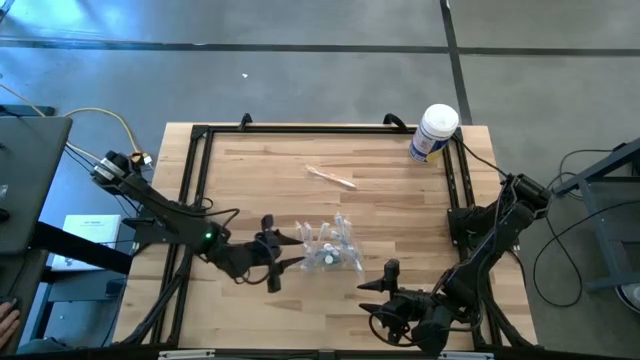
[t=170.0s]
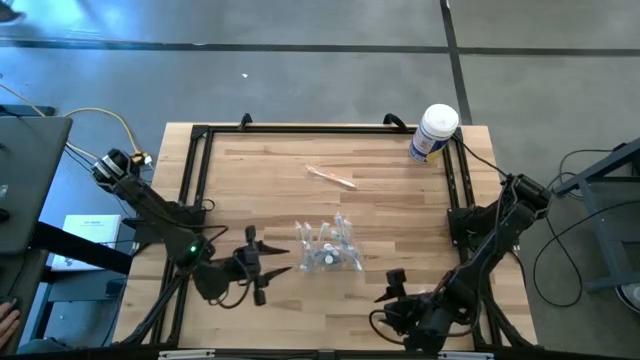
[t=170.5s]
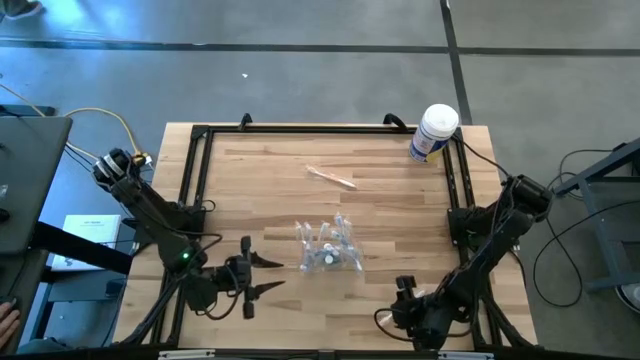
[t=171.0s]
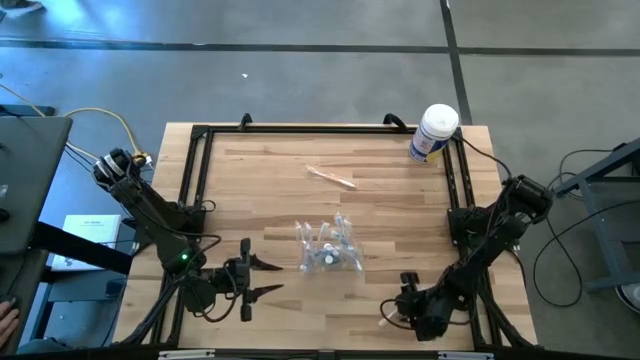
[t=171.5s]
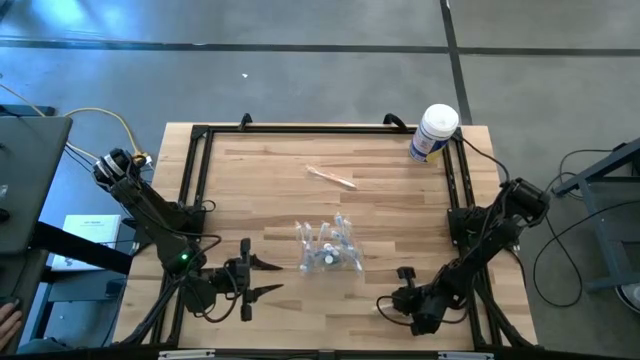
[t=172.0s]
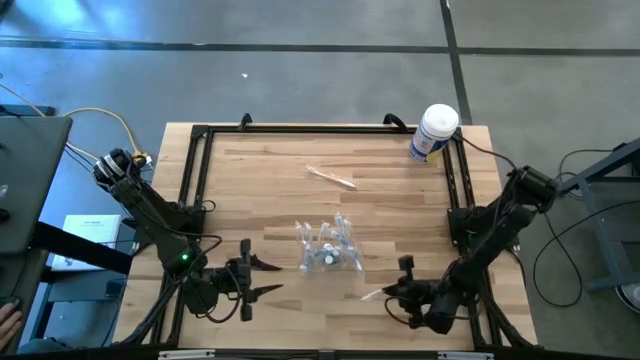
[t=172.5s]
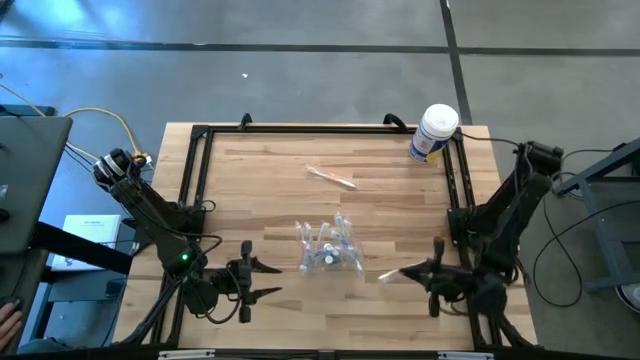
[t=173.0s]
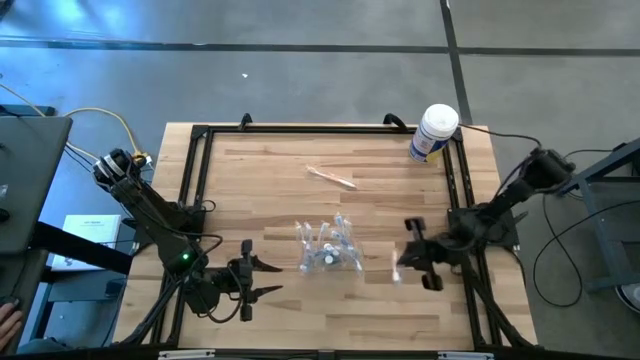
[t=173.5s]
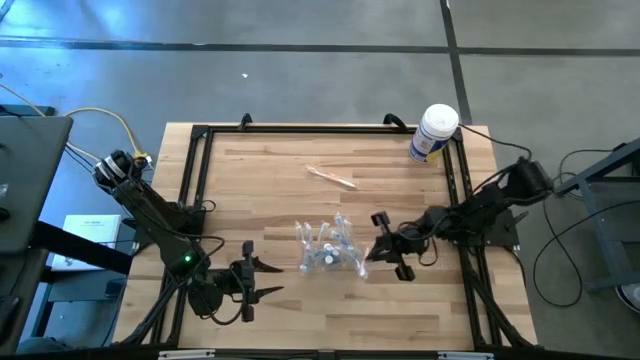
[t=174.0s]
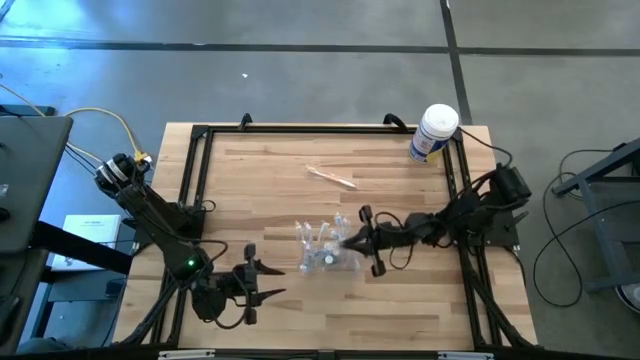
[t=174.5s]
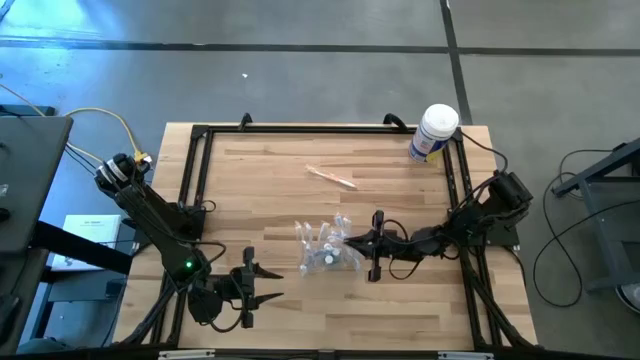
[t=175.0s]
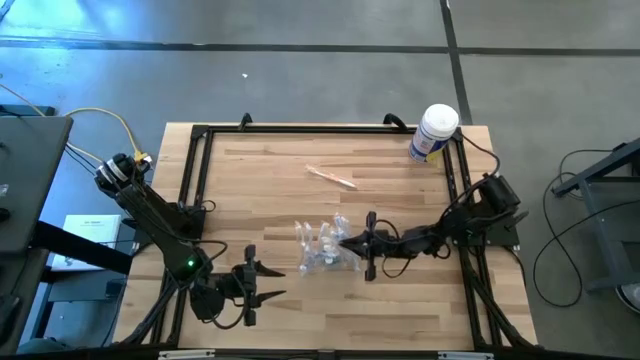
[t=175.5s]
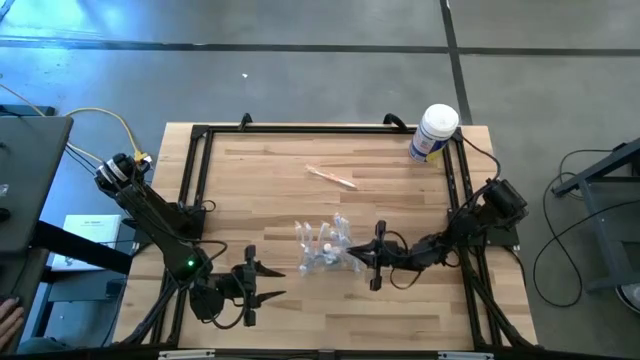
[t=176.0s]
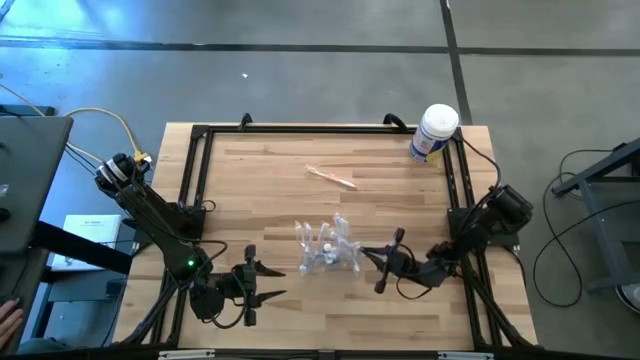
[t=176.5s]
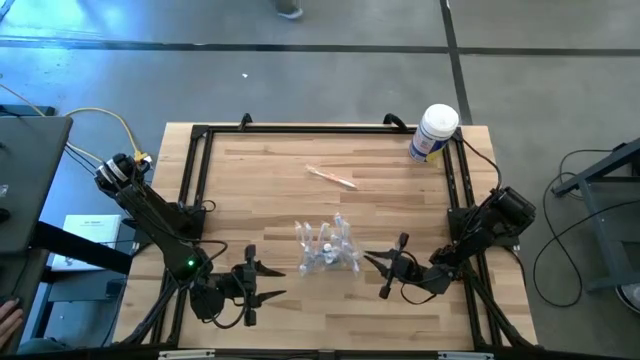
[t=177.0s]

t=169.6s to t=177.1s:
Task: Pick & Place toothbrushing station
Put the orange toothbrush into the transparent organizer

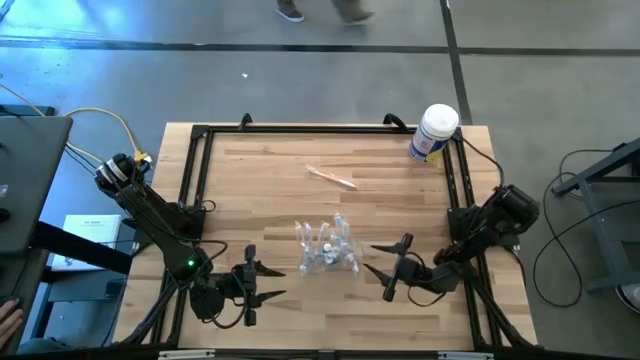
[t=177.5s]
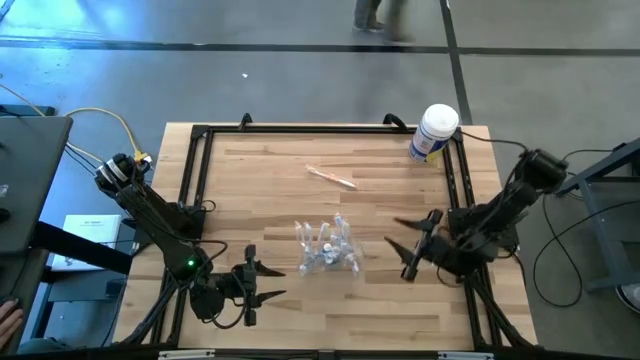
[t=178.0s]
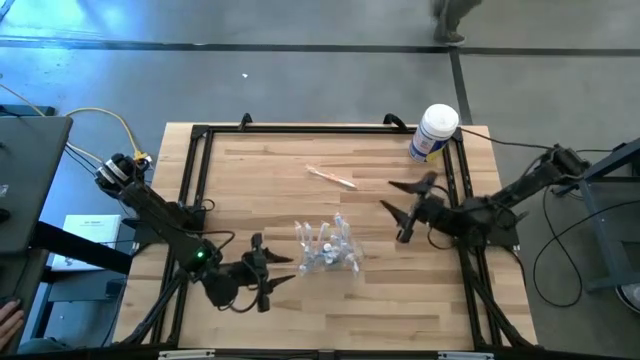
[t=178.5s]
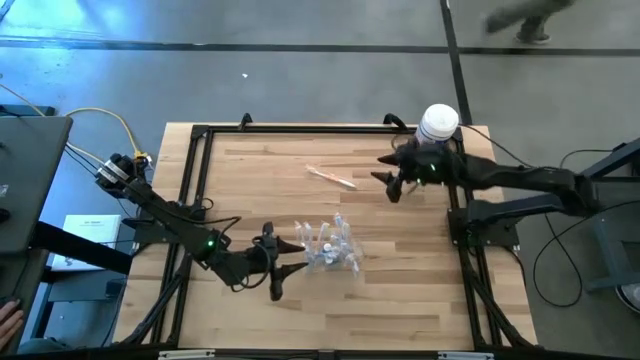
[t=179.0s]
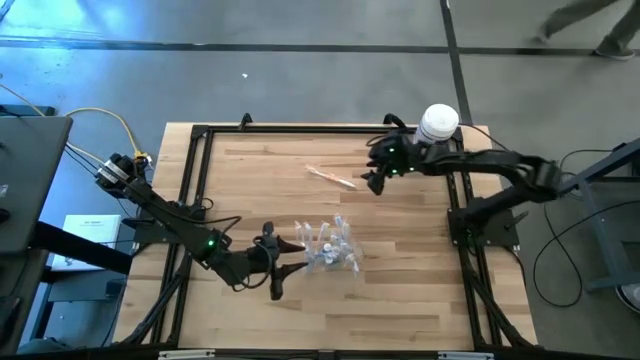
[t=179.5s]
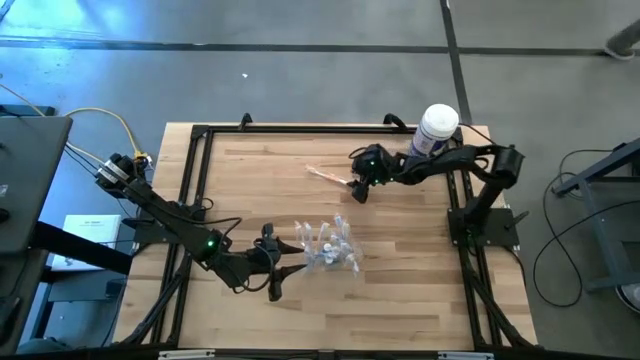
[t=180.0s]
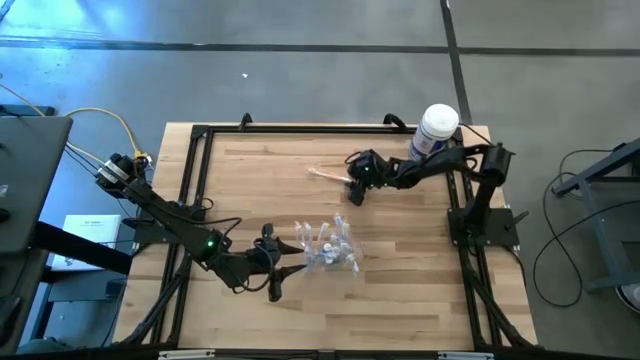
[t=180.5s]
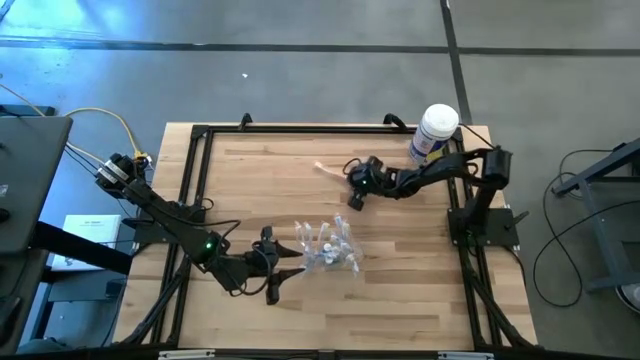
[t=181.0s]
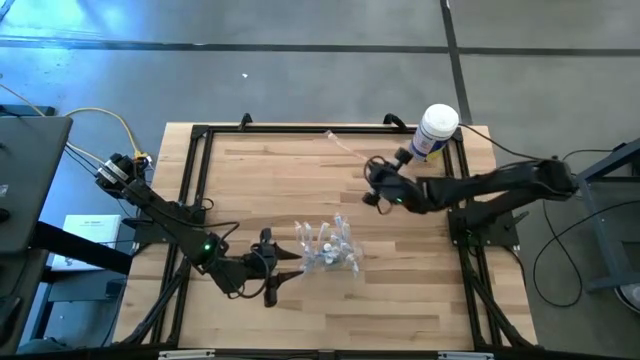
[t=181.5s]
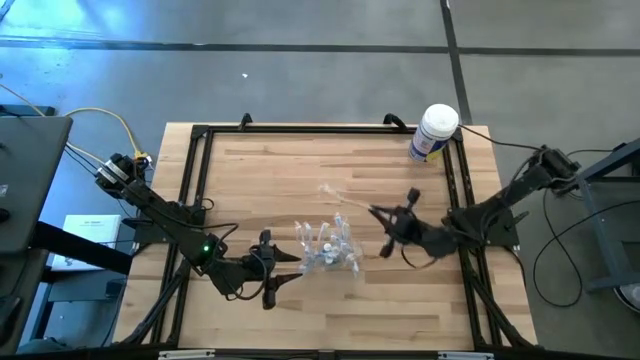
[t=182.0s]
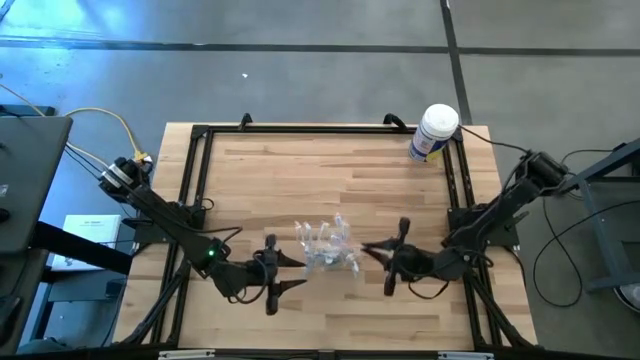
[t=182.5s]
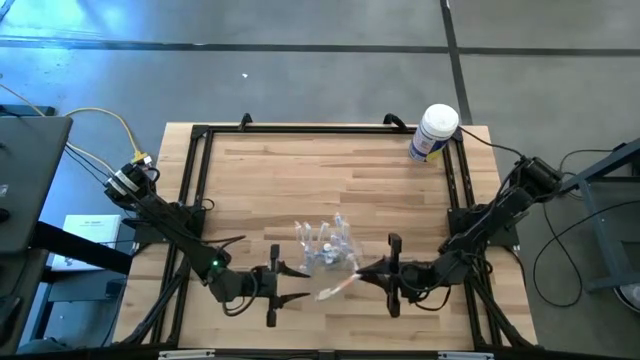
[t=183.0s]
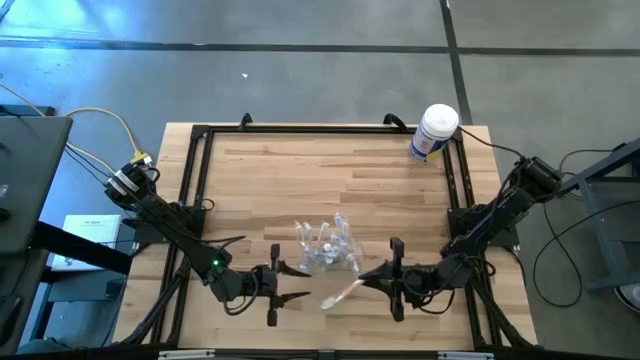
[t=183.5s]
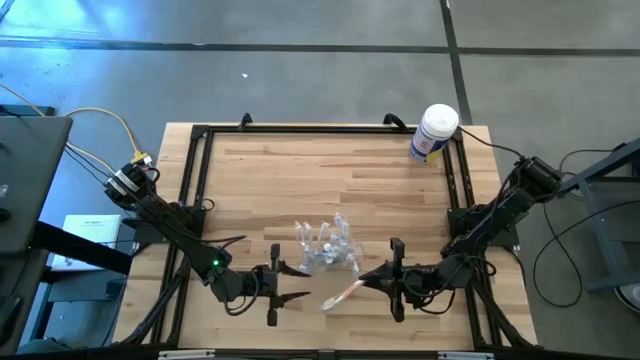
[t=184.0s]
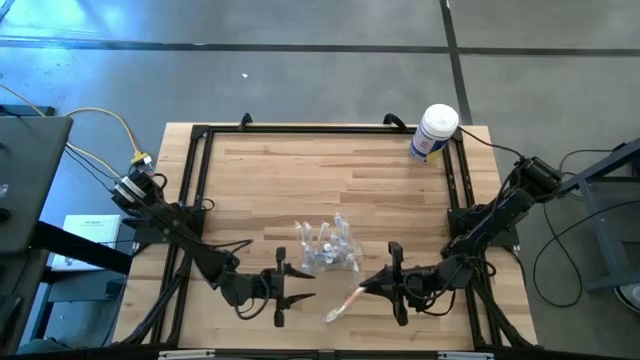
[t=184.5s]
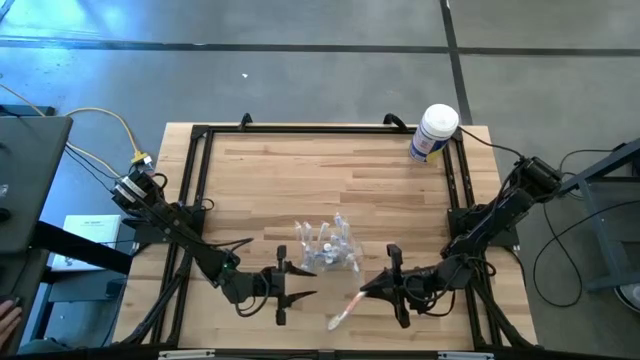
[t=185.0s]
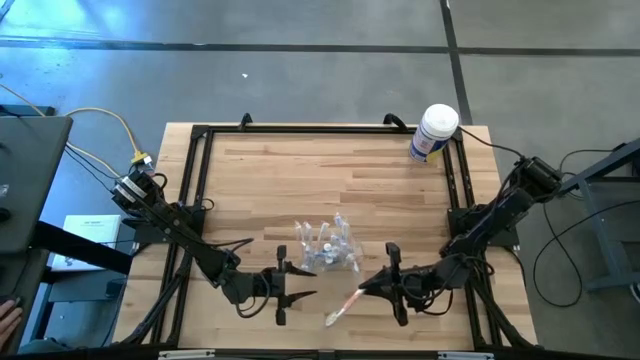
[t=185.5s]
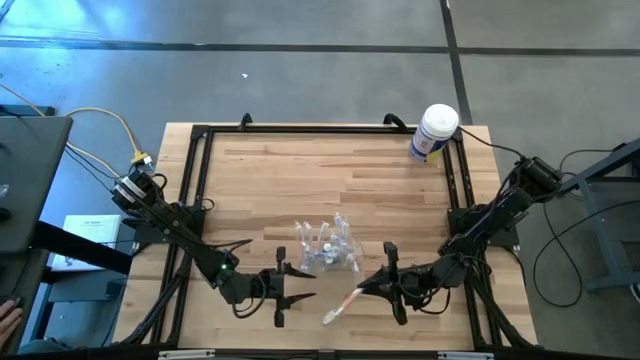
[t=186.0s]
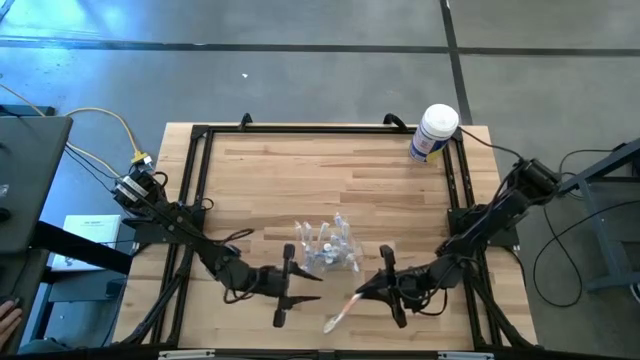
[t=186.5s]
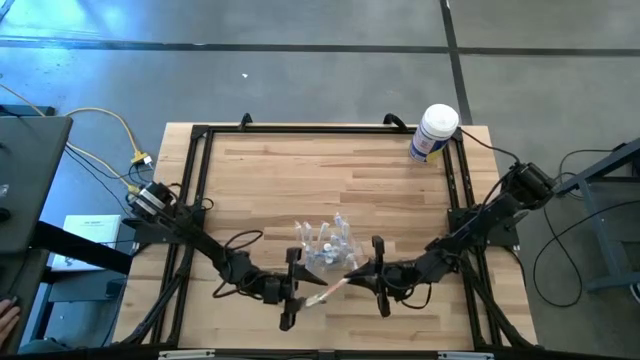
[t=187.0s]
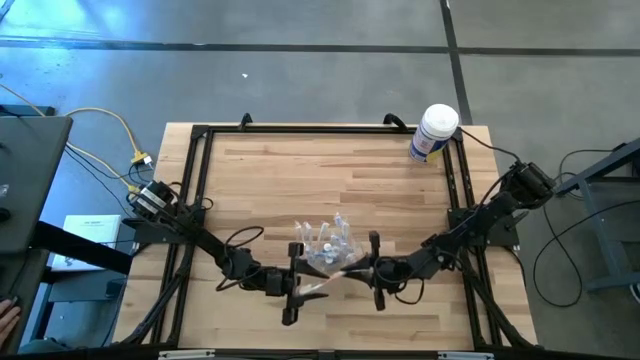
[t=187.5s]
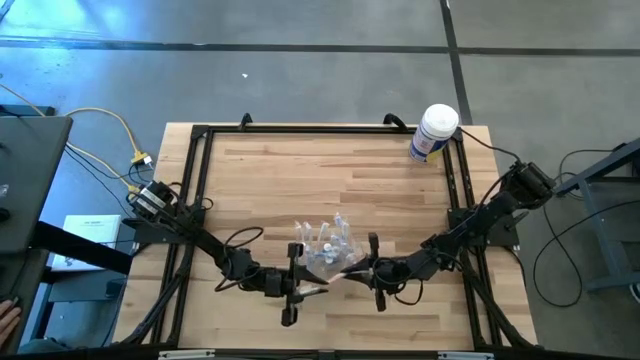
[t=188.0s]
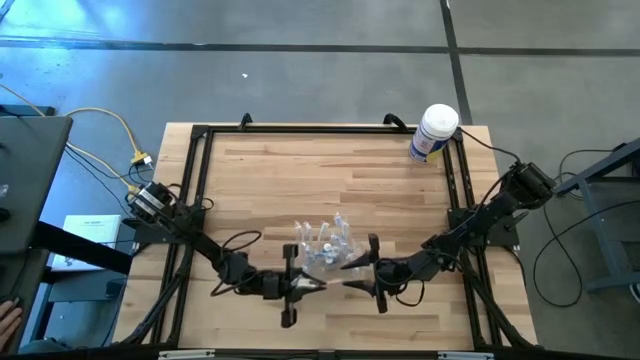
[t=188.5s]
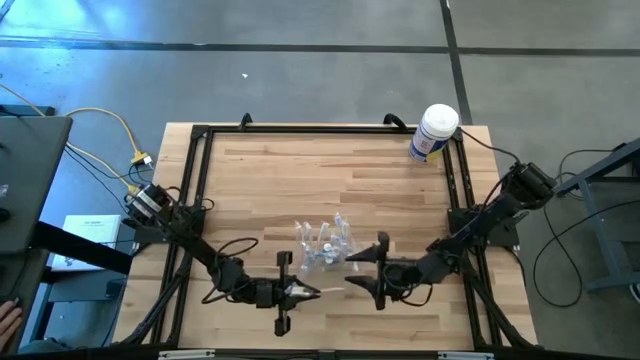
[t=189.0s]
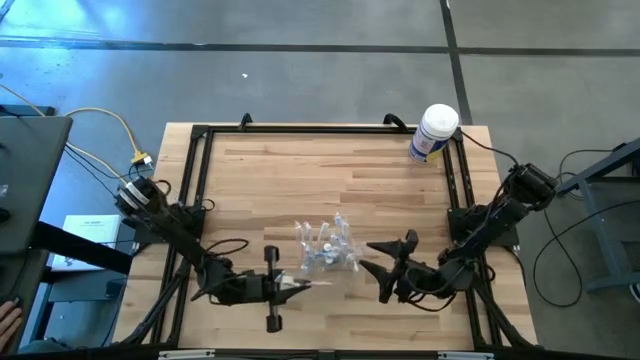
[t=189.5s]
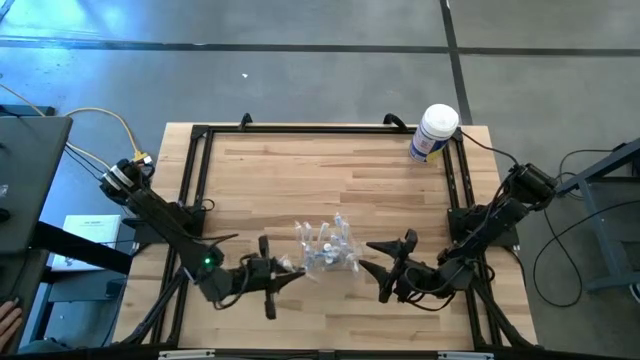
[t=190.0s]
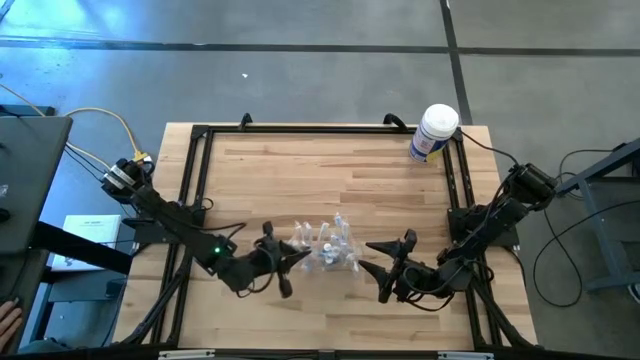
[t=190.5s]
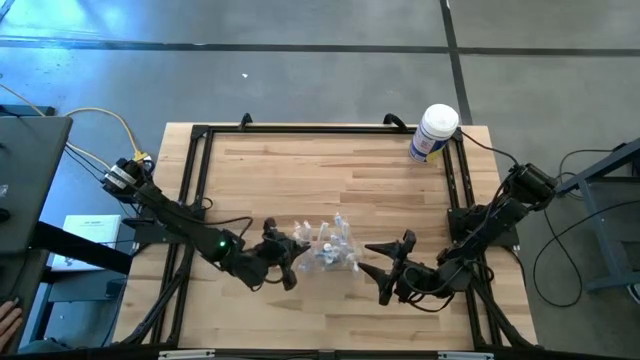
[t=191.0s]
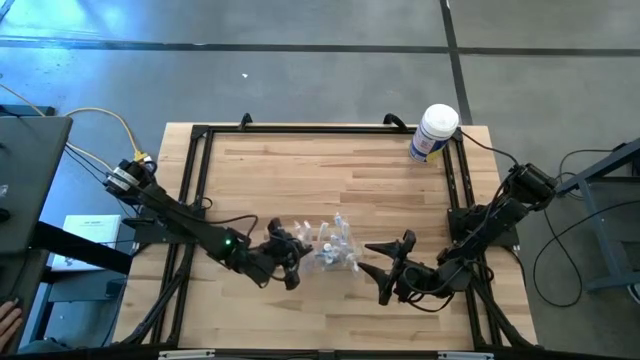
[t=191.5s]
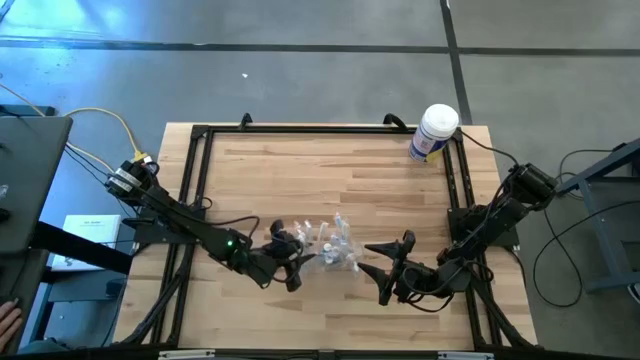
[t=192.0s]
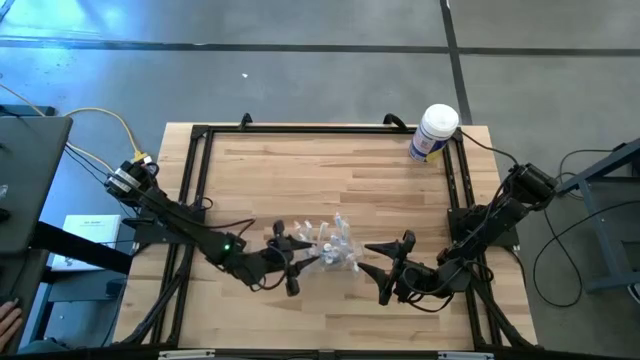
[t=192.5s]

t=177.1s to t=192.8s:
Put the orange toothbrush into the transparent organizer
